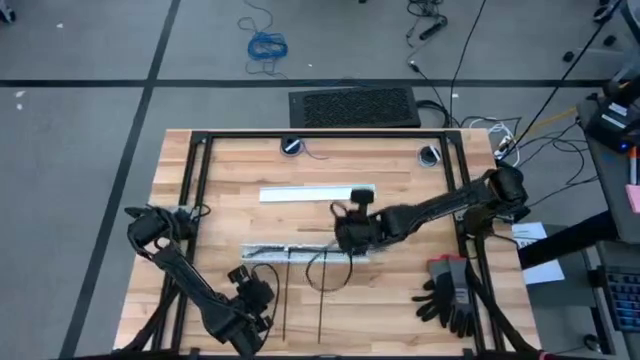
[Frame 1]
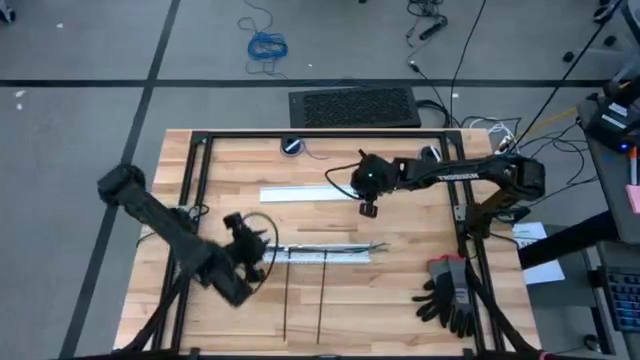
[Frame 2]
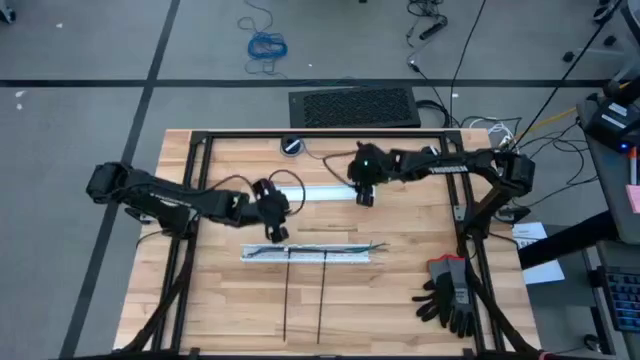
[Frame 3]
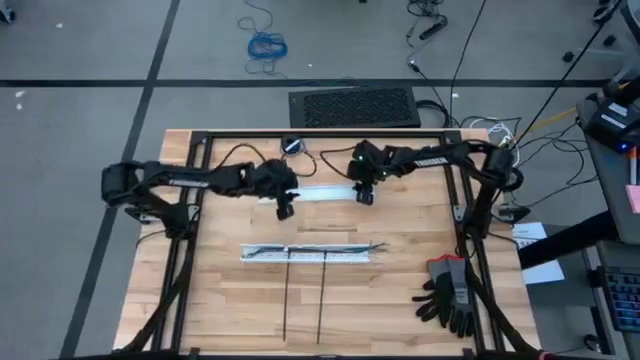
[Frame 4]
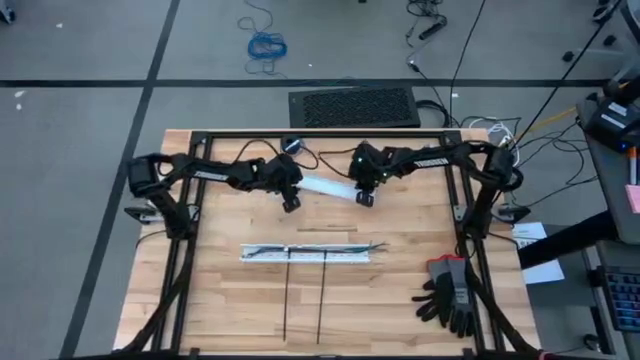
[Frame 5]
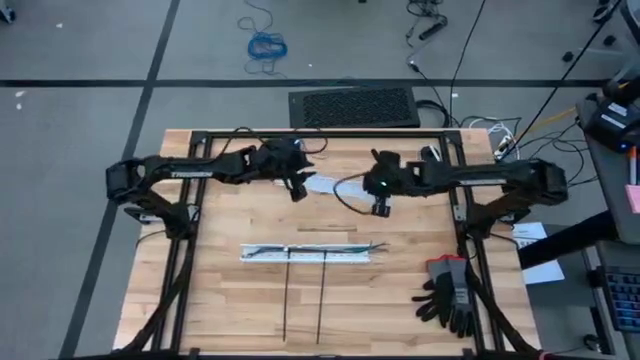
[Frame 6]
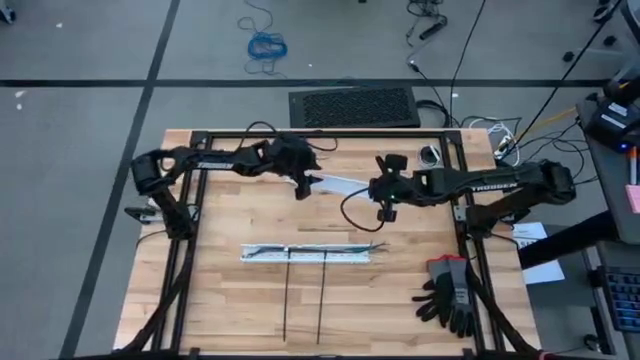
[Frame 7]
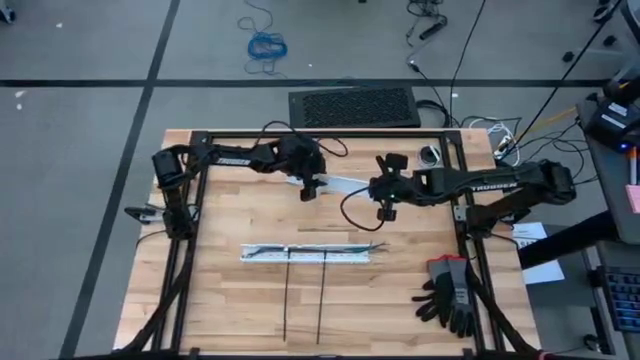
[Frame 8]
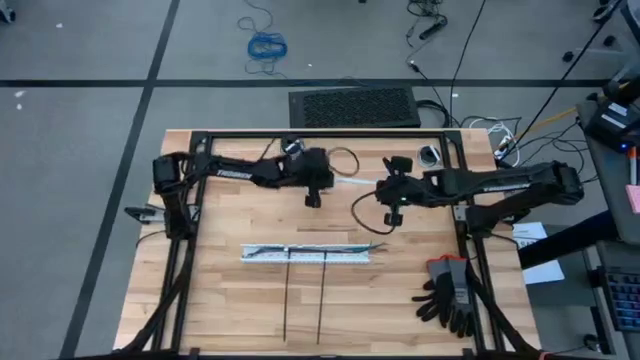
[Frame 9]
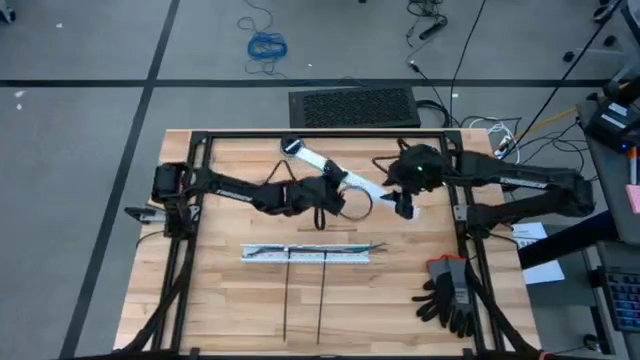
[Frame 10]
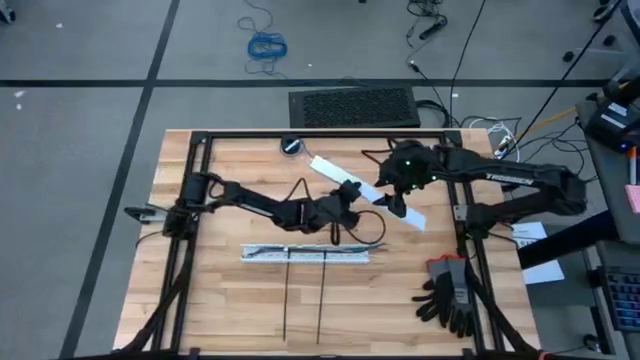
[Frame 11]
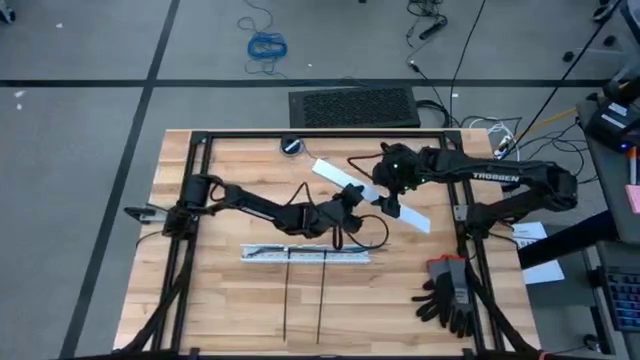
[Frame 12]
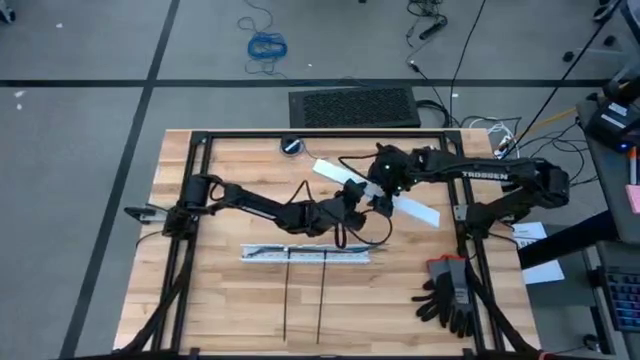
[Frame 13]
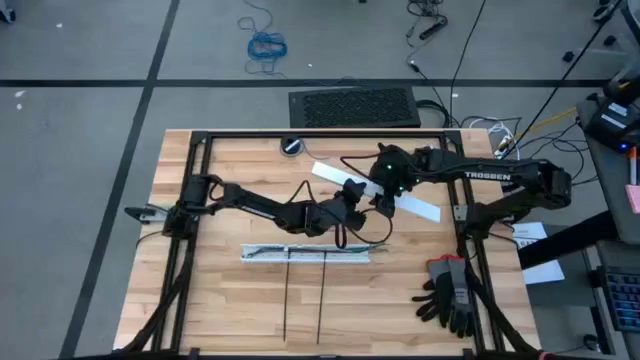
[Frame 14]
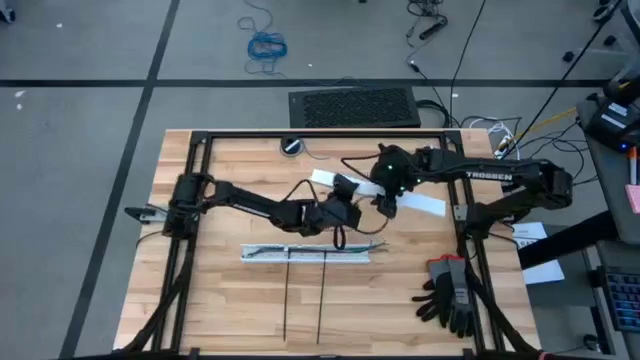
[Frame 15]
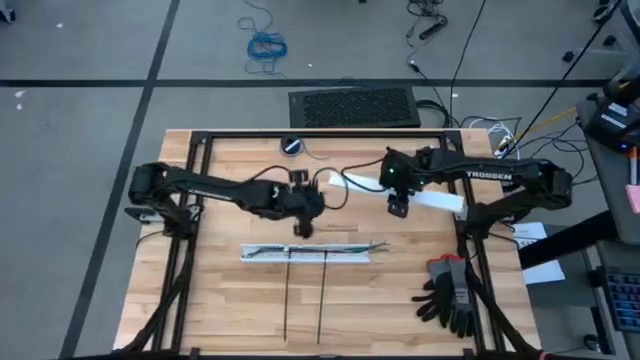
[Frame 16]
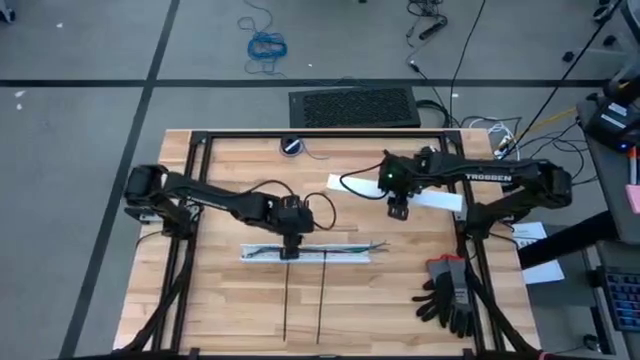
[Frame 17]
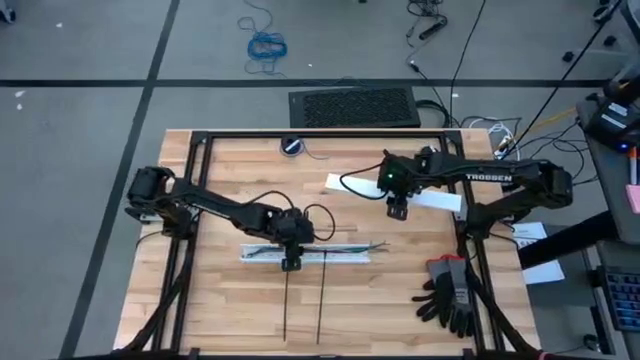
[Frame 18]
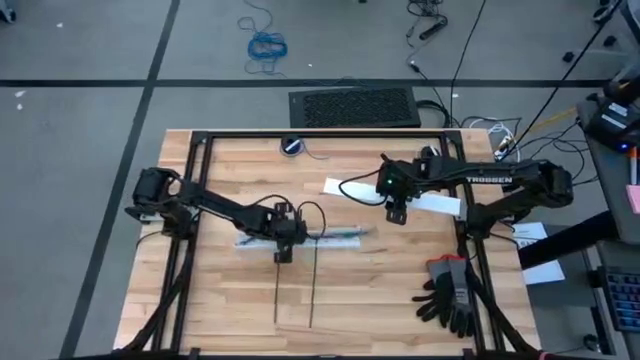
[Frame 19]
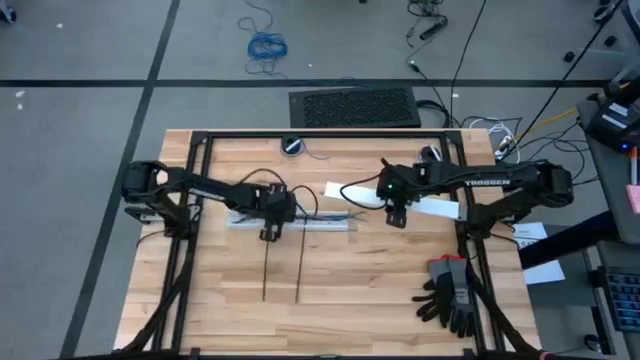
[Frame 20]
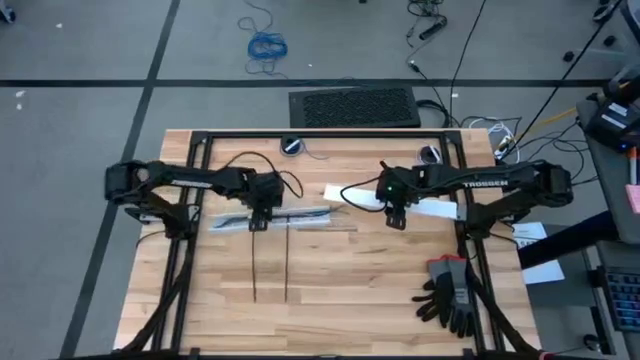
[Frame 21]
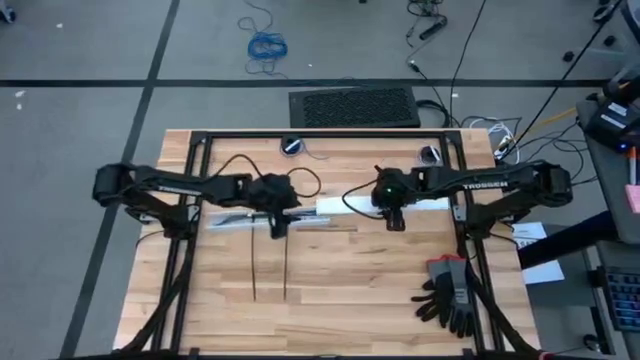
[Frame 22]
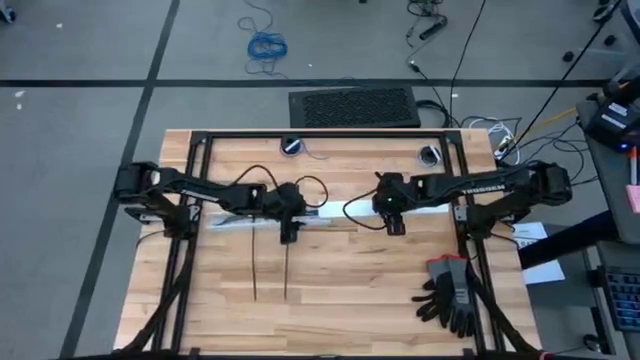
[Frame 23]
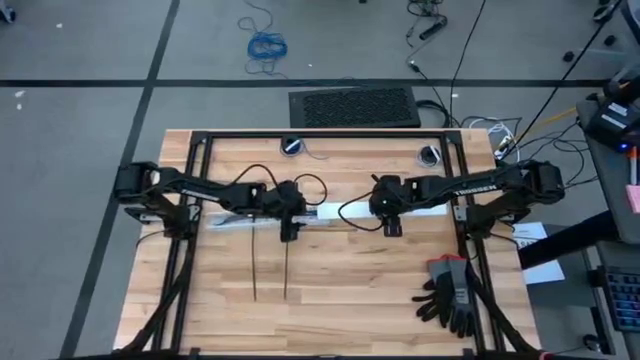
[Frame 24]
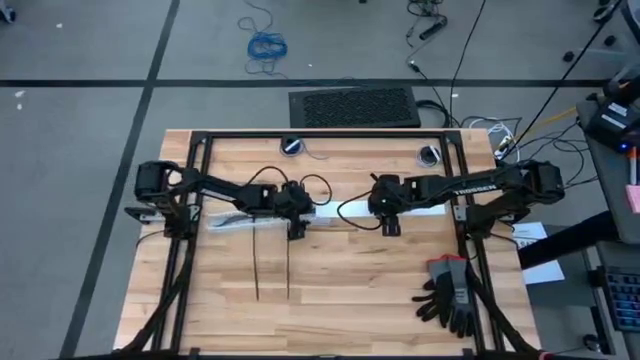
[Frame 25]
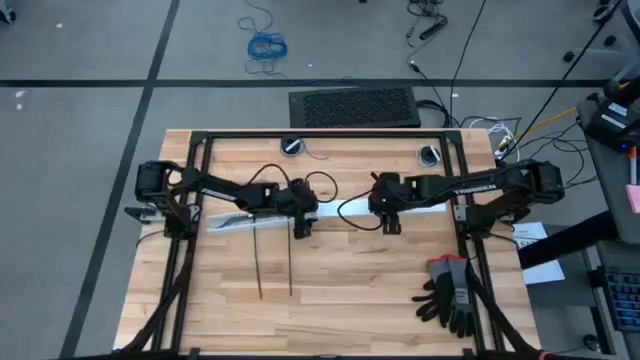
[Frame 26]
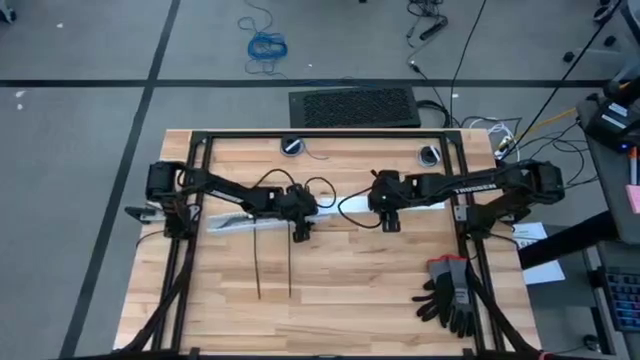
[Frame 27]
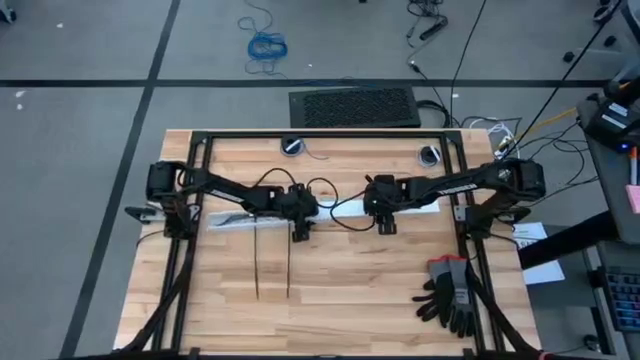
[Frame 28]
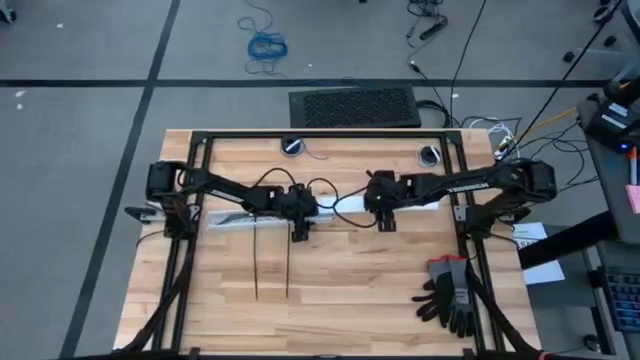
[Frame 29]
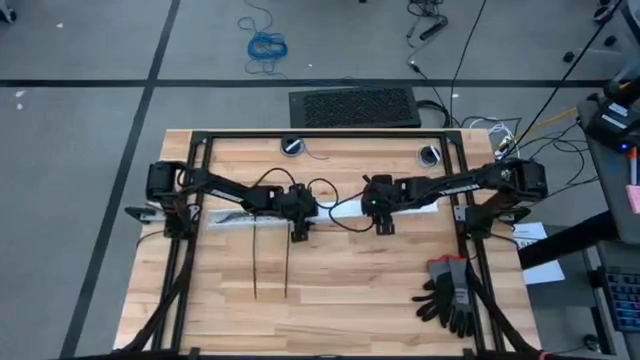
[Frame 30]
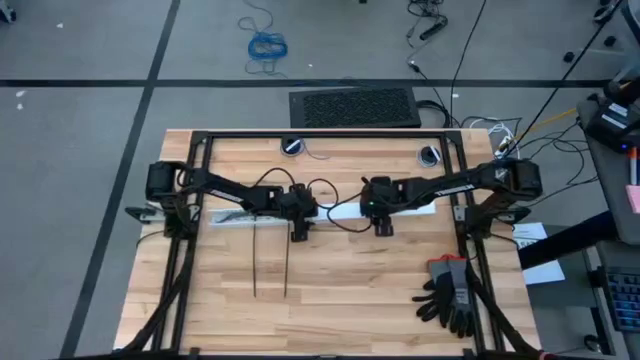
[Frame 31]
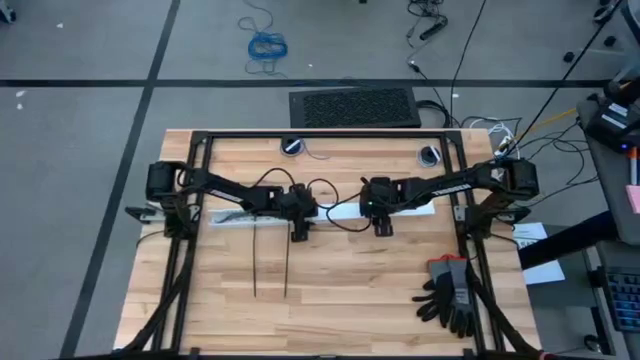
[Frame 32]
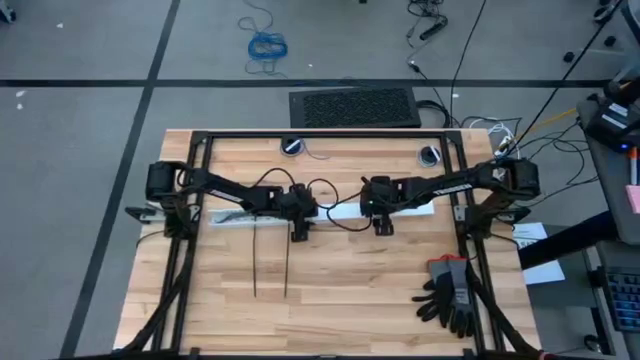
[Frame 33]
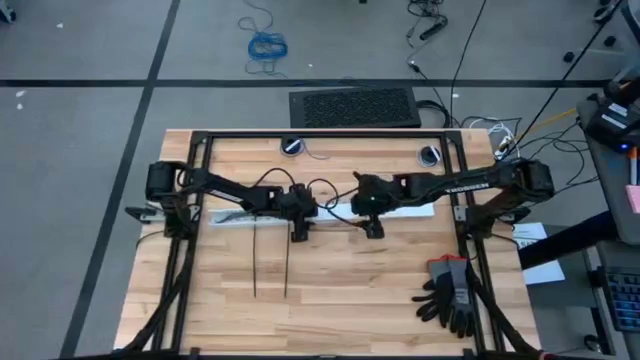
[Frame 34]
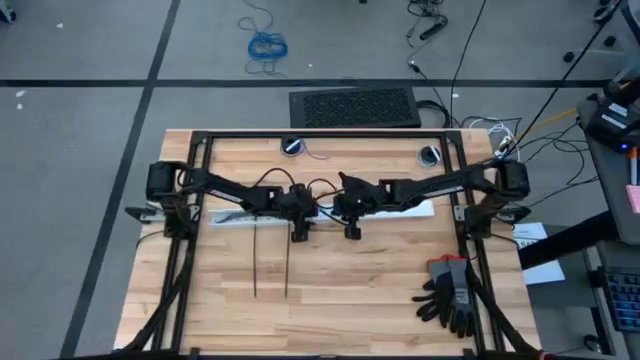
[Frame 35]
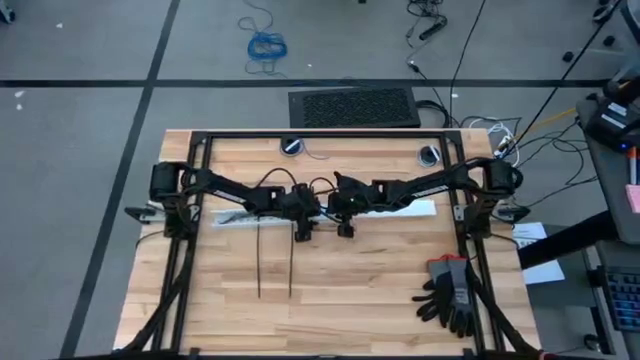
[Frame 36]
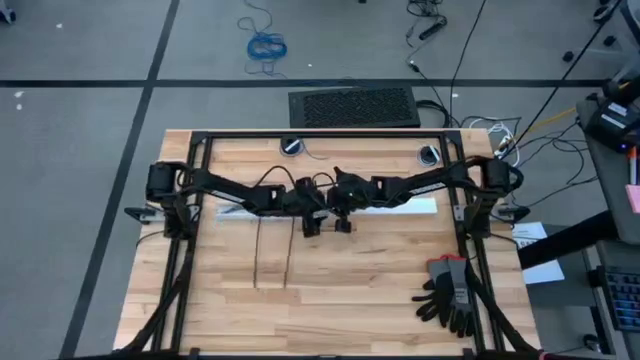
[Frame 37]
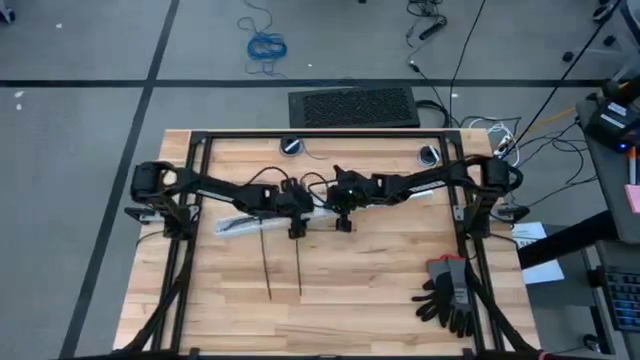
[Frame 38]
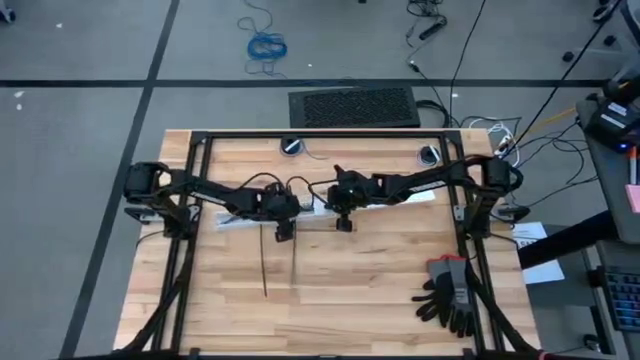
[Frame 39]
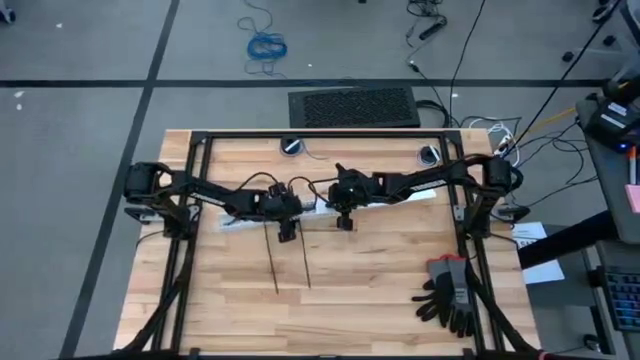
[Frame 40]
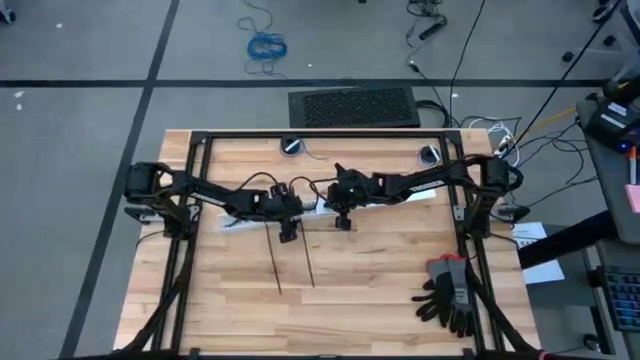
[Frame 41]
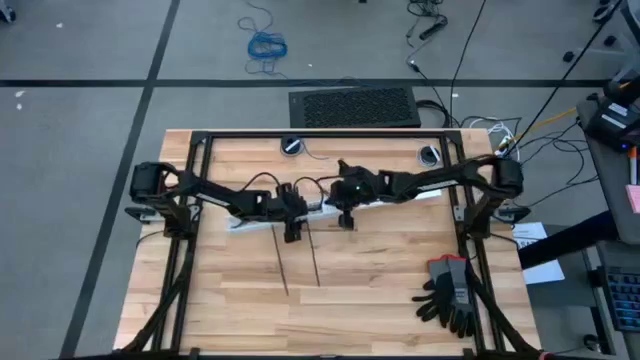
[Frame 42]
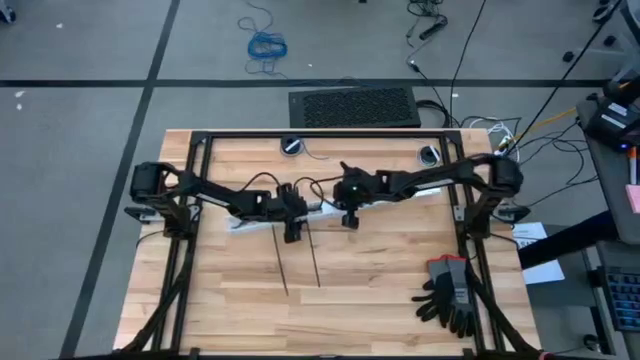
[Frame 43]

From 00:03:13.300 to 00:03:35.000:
Task: Ziptie cables
Close the cable duct
